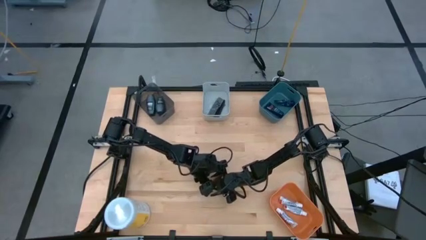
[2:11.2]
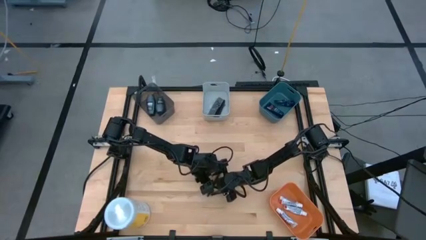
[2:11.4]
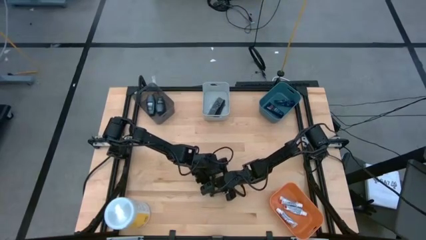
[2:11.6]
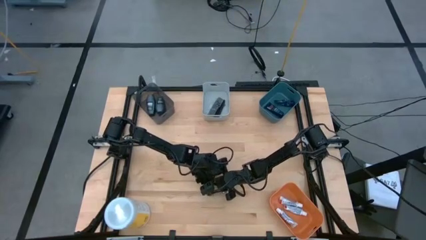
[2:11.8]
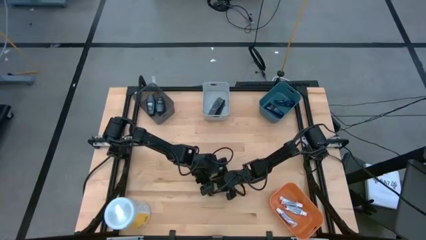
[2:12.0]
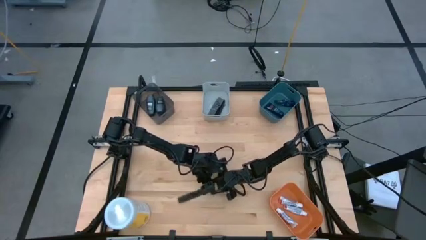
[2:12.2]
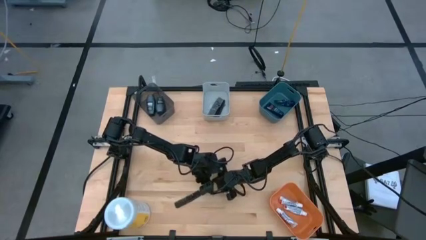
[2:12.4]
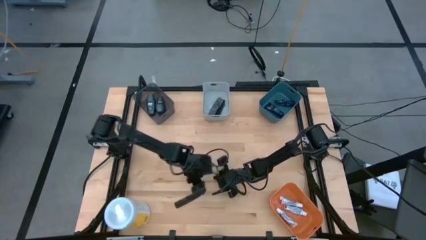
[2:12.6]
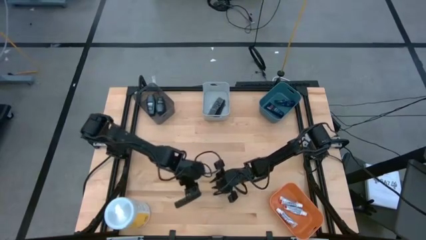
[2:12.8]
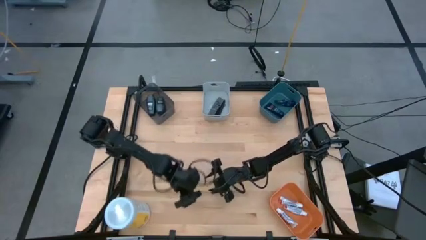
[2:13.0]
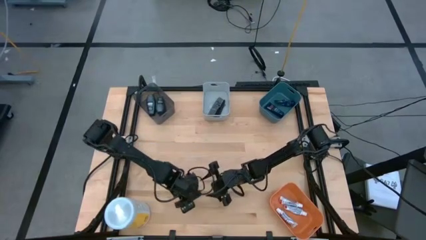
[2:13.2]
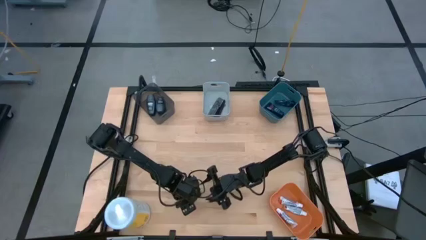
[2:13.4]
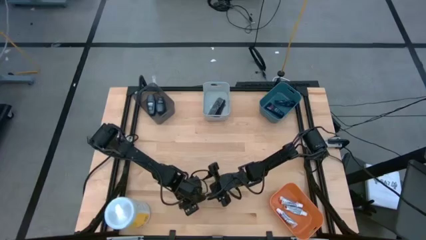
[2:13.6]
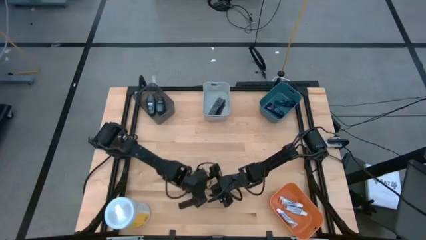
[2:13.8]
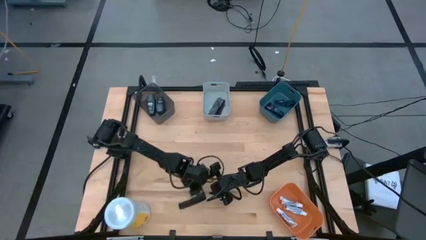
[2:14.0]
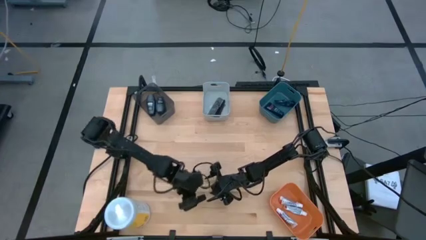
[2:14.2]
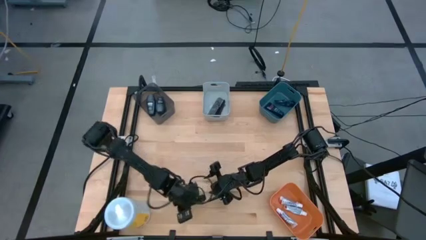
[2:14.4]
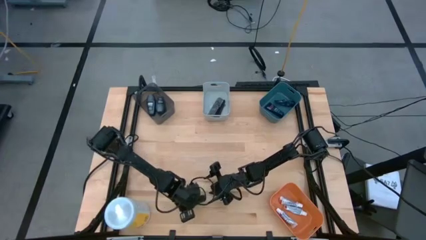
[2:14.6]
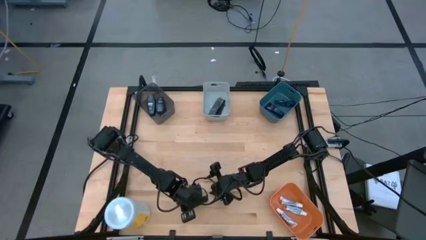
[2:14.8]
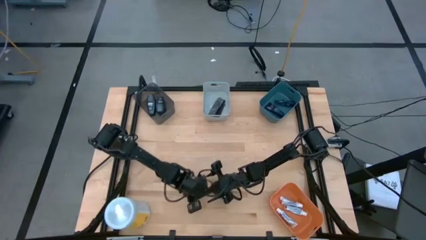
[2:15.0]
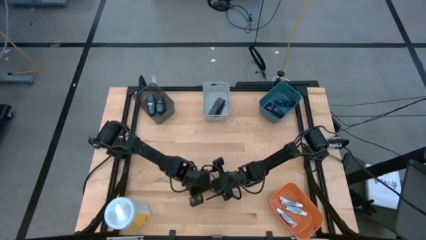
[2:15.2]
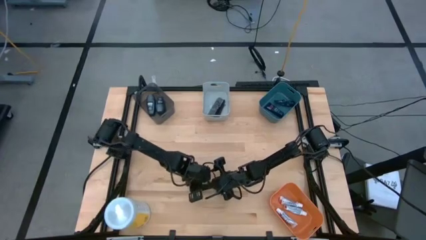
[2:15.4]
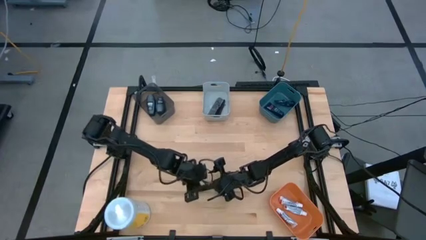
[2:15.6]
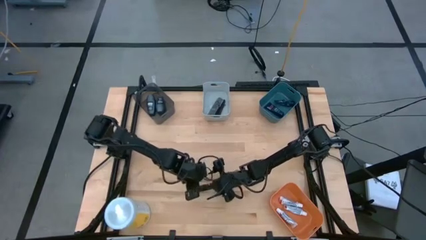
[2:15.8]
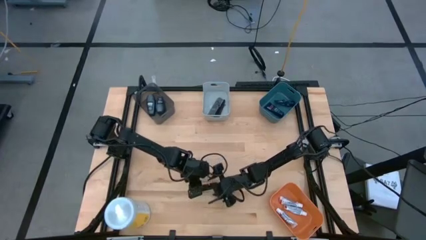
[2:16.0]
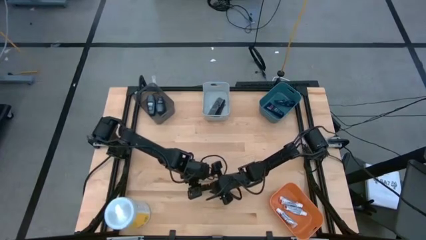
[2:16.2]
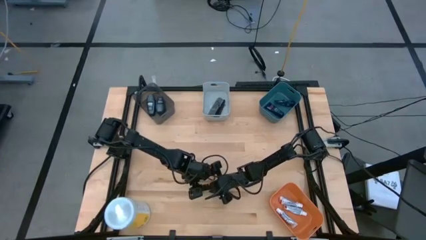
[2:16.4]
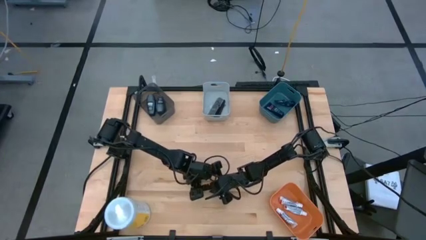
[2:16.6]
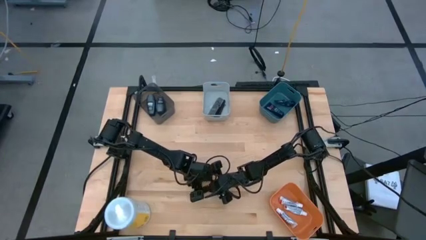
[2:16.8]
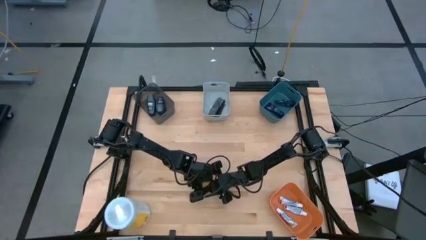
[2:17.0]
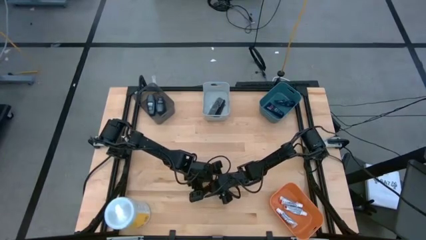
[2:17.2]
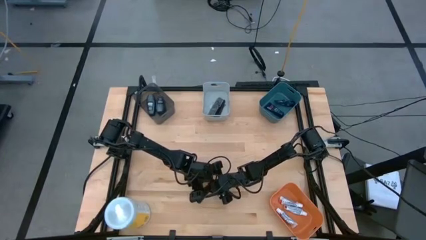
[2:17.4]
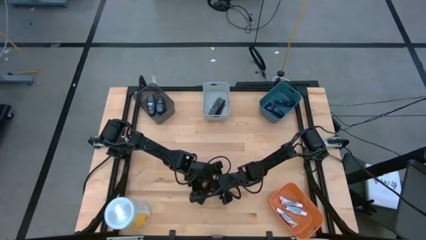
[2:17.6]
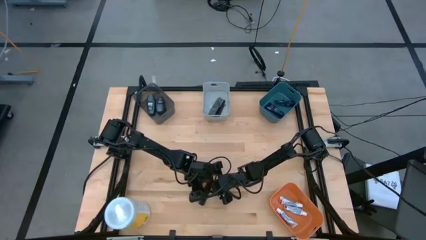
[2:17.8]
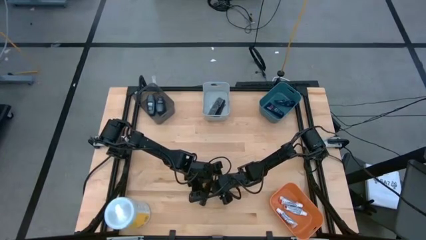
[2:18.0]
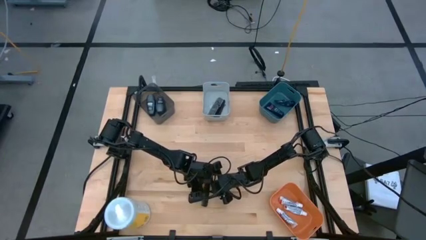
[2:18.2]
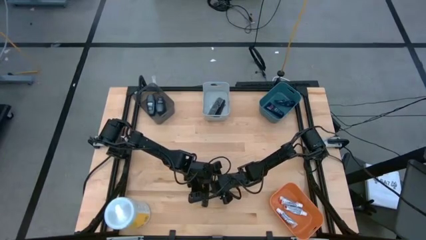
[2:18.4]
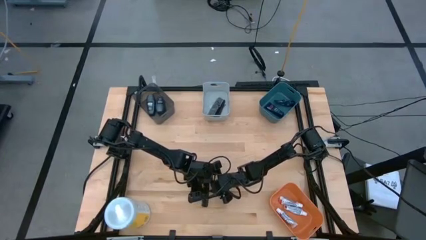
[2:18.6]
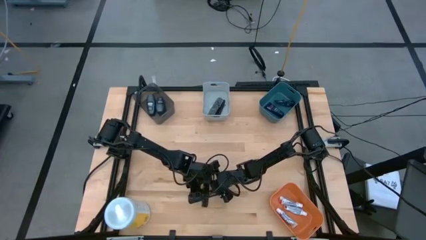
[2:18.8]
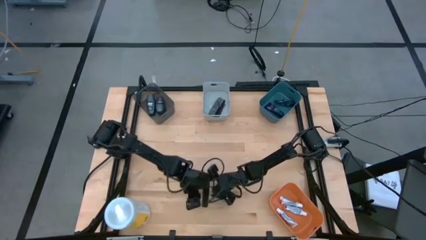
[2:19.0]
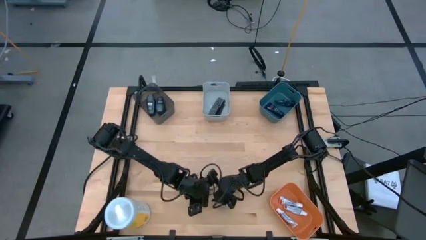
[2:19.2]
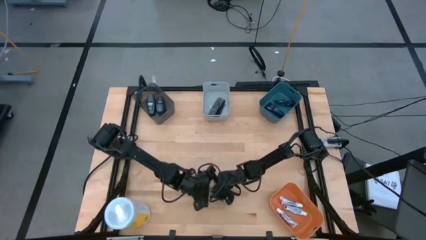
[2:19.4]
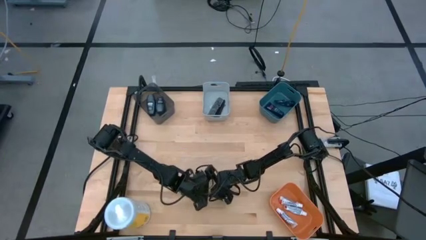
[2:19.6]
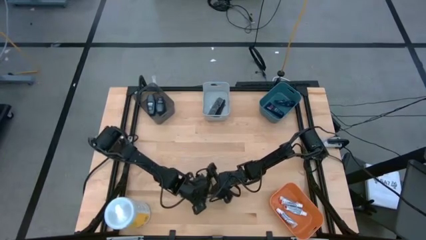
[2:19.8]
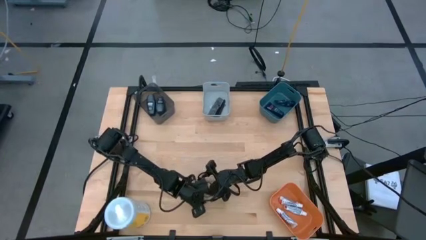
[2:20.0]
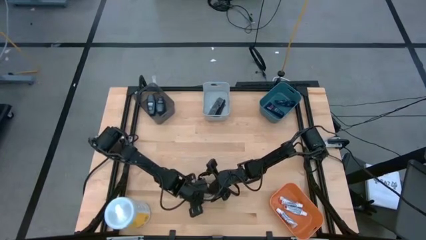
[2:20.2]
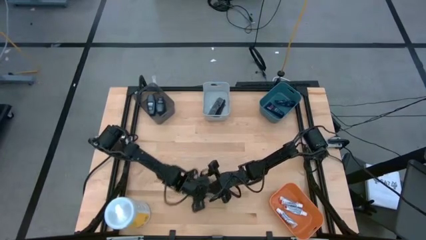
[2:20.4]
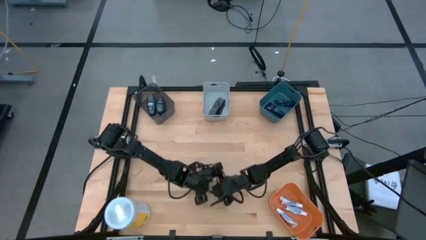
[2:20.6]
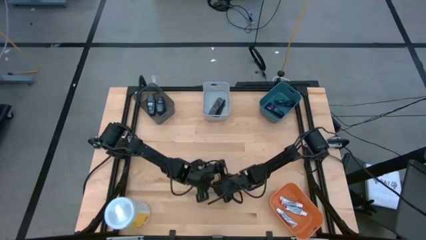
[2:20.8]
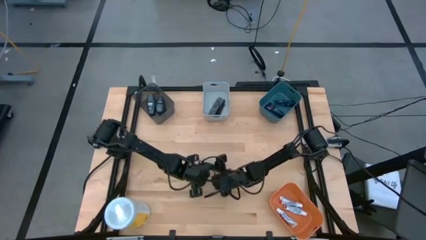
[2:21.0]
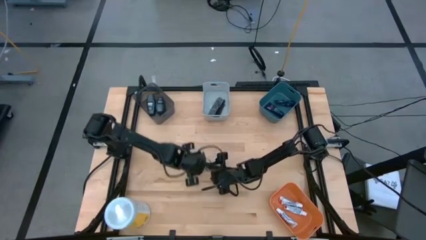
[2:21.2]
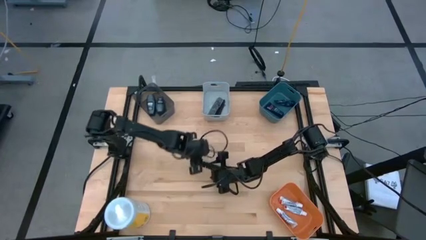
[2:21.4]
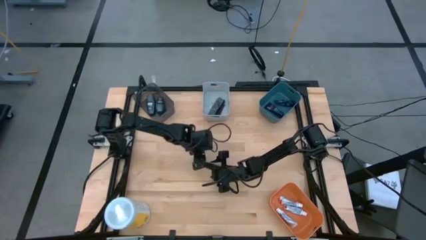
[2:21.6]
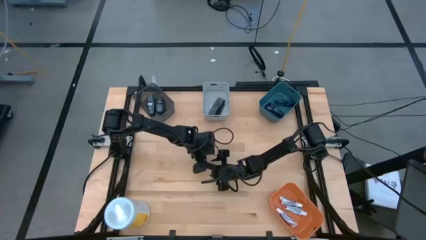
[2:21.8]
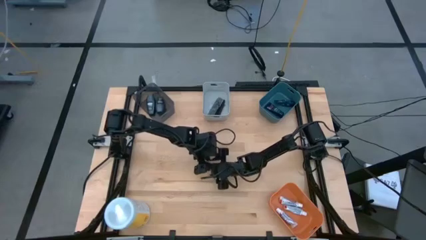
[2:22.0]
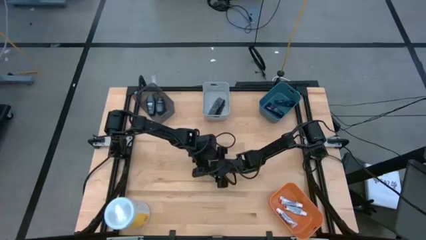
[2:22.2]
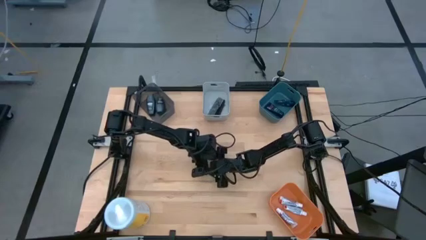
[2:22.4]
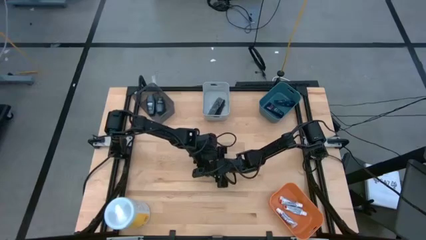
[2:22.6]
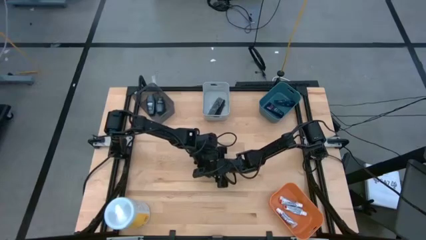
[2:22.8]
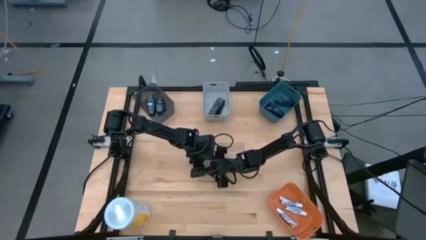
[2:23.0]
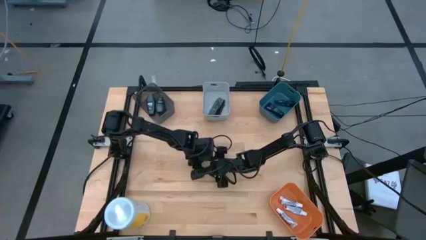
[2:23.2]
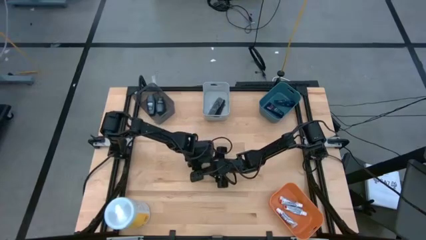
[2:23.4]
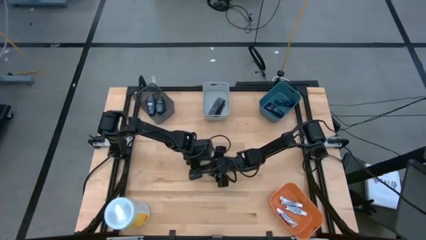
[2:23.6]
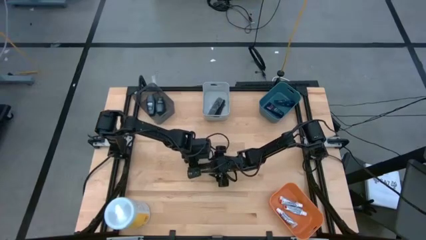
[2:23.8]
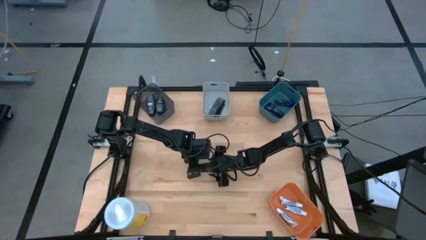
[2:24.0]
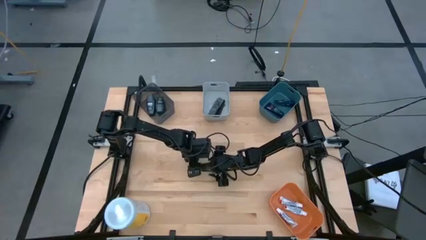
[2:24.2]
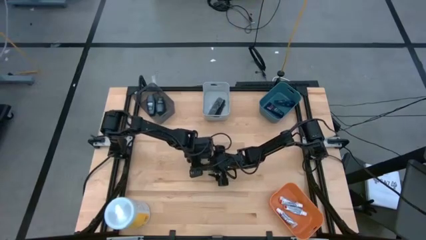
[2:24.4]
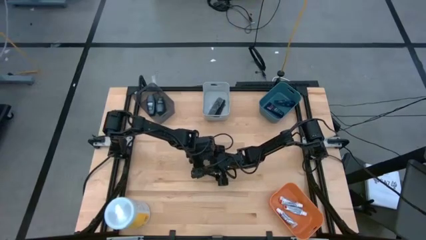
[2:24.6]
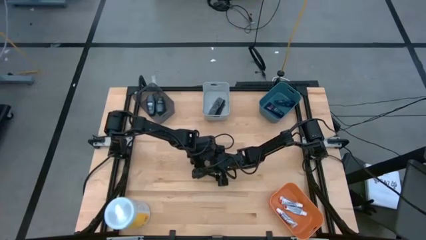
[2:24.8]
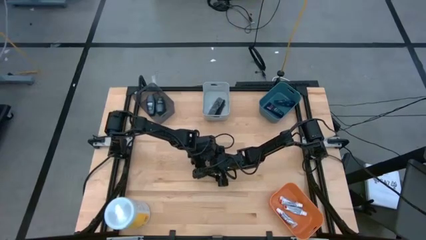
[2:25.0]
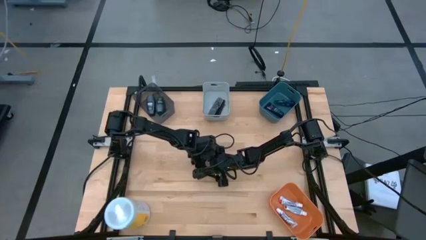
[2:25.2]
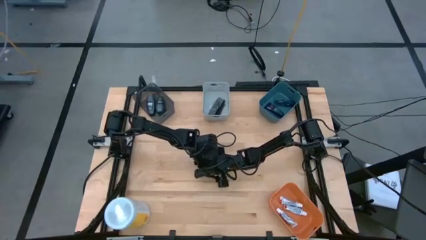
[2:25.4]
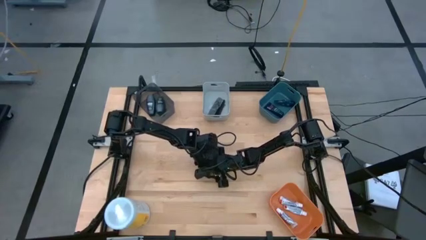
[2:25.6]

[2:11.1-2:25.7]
Task: Pick & Place Travel size toiletries
Put the black comb into the gray bin

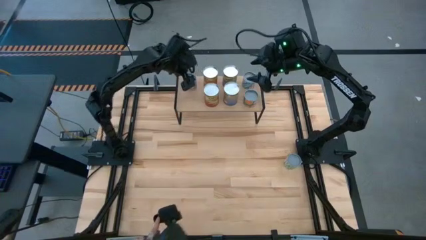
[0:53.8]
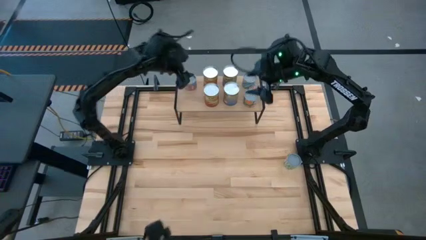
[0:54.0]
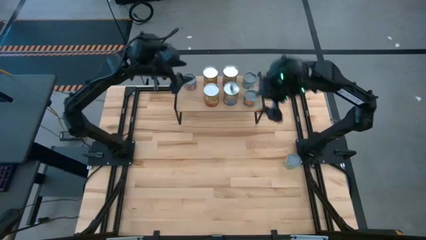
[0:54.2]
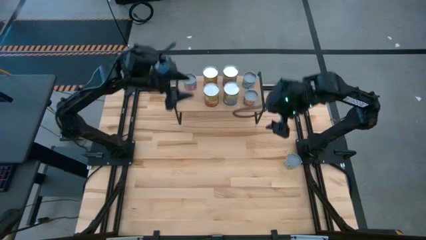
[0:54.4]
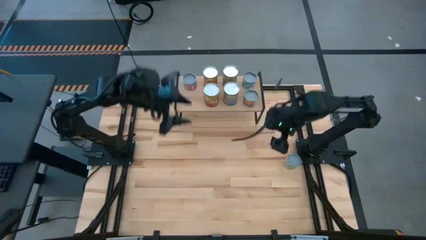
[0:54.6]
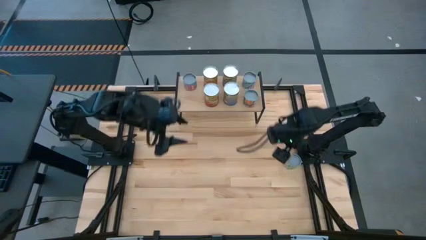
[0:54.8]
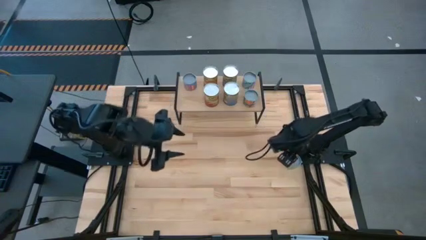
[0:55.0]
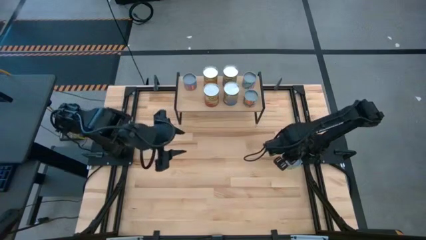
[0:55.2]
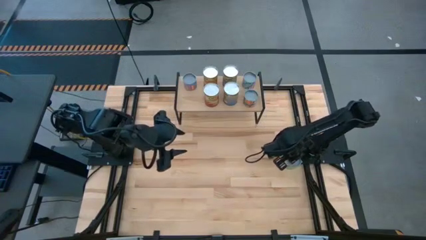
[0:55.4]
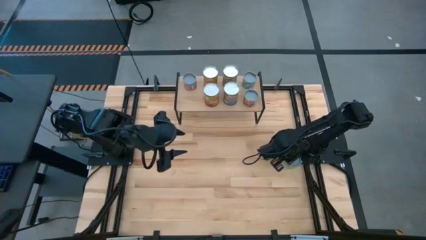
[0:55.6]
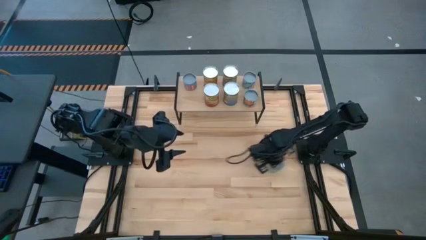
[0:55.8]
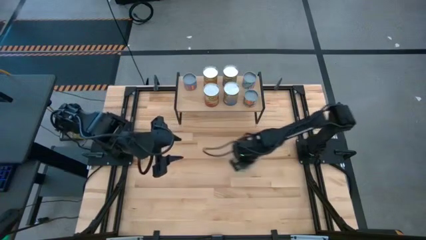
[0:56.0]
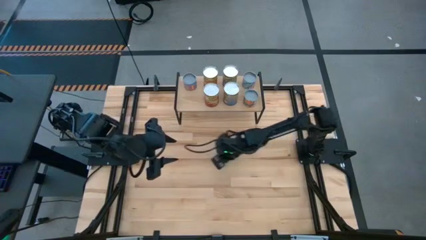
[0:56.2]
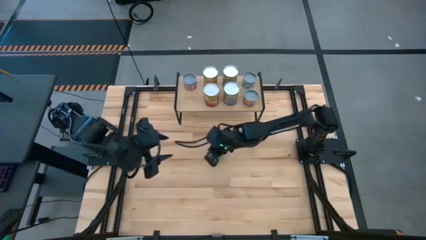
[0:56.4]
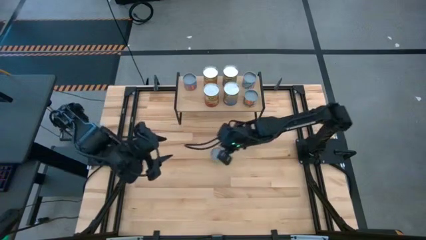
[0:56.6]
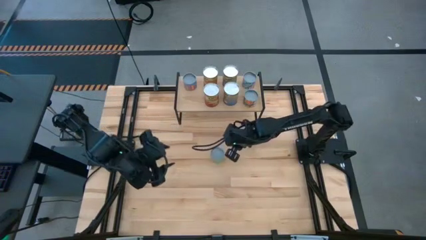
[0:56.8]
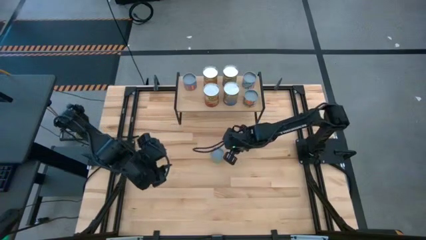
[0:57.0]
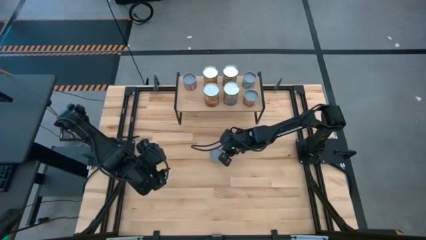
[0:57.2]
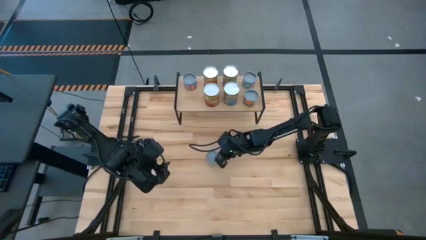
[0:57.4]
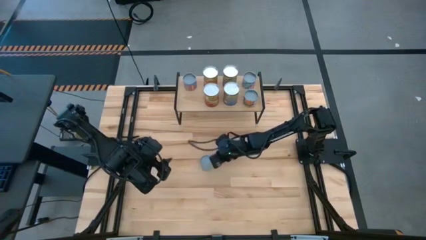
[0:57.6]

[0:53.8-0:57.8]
Task: Pick and place cans onto a shelf
Put the canned green peas on the shelf
